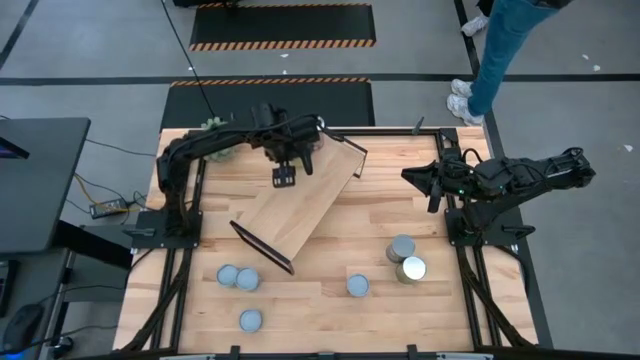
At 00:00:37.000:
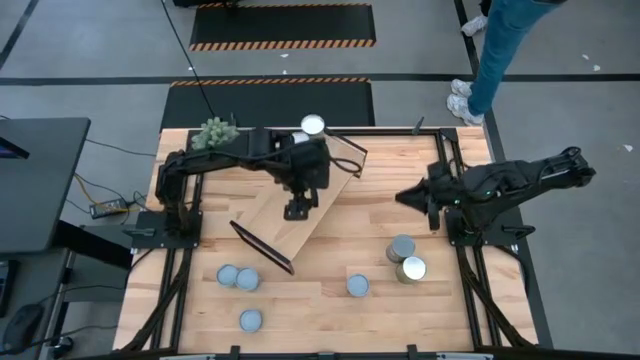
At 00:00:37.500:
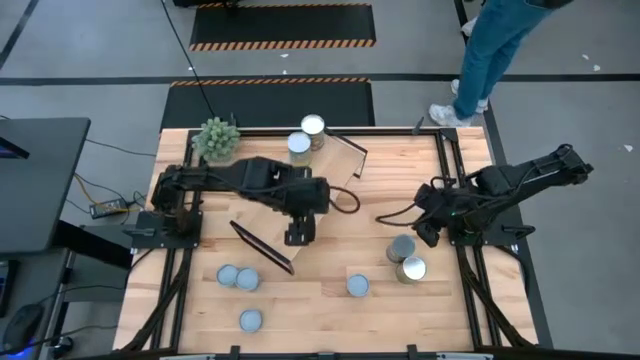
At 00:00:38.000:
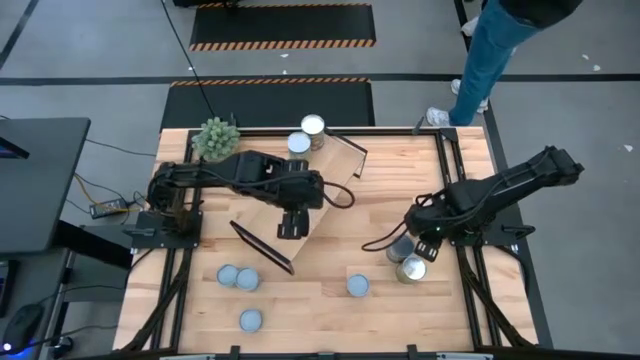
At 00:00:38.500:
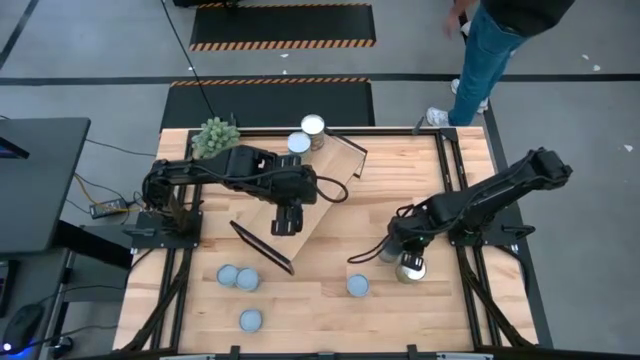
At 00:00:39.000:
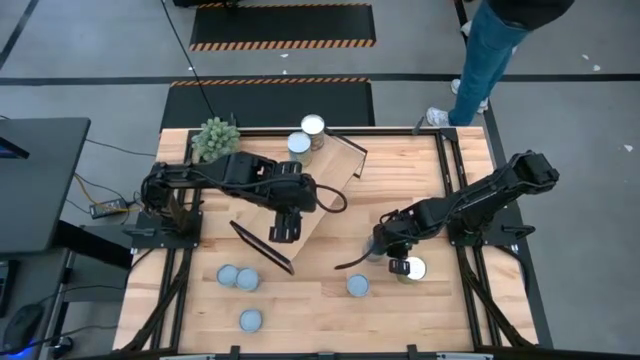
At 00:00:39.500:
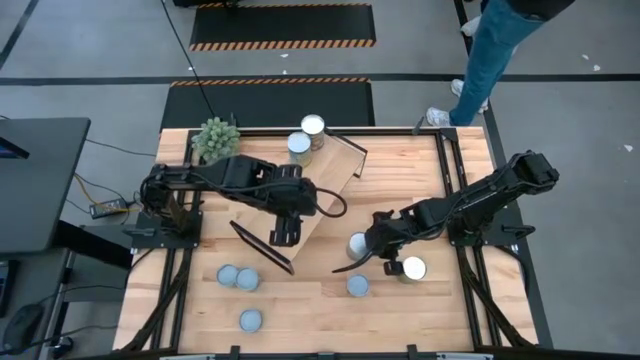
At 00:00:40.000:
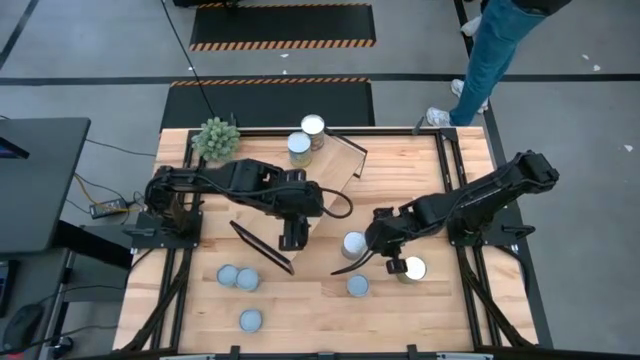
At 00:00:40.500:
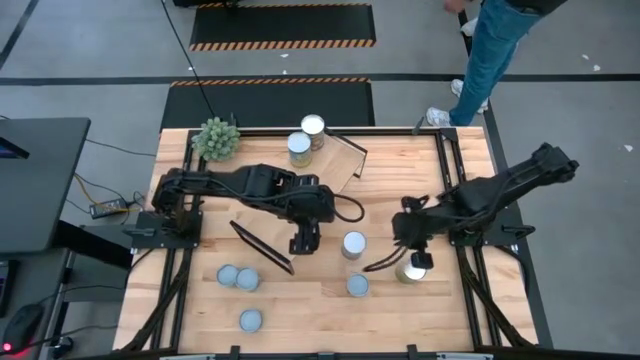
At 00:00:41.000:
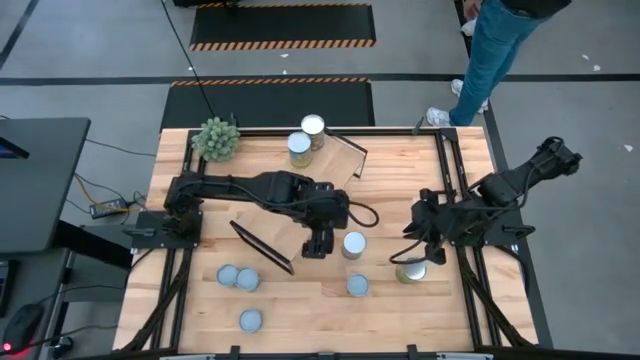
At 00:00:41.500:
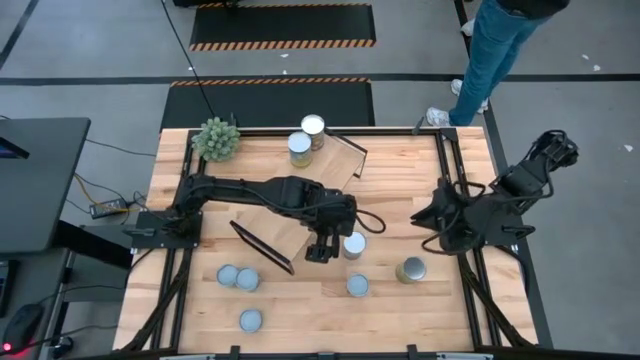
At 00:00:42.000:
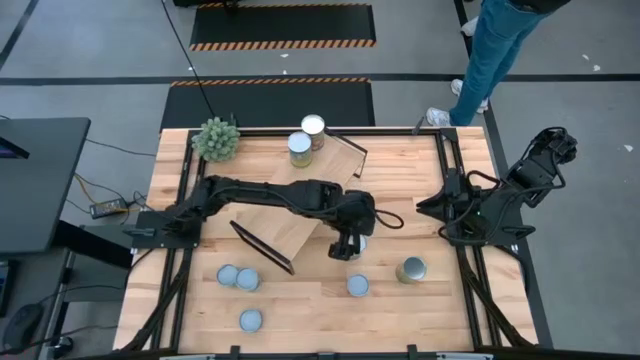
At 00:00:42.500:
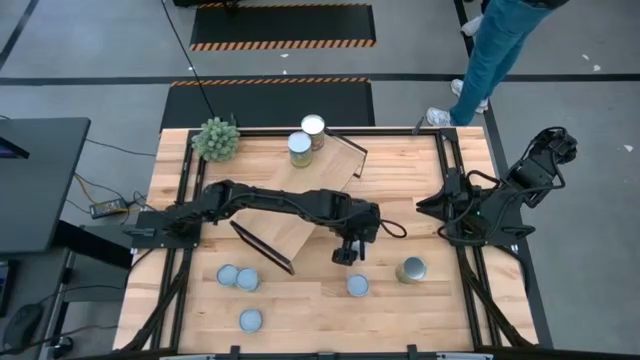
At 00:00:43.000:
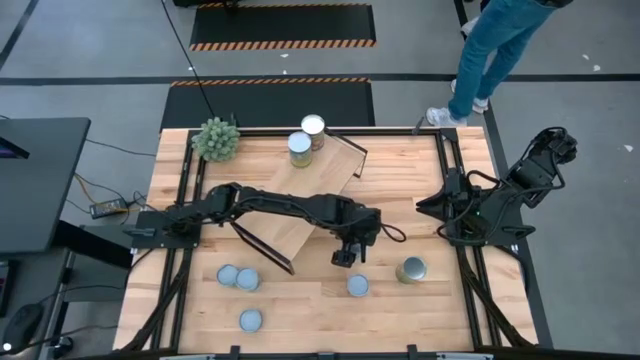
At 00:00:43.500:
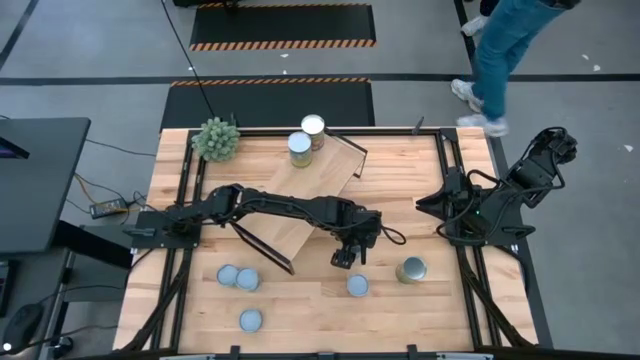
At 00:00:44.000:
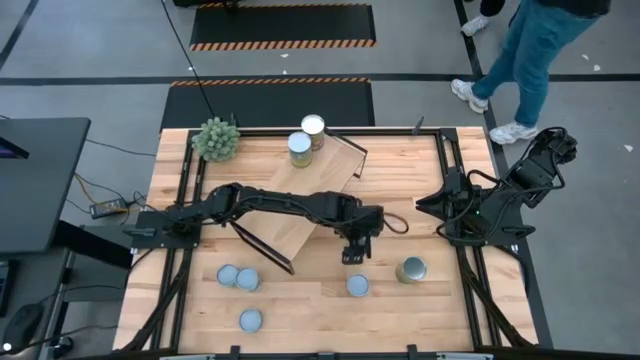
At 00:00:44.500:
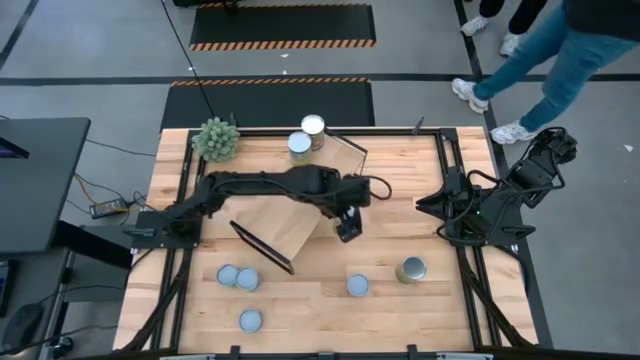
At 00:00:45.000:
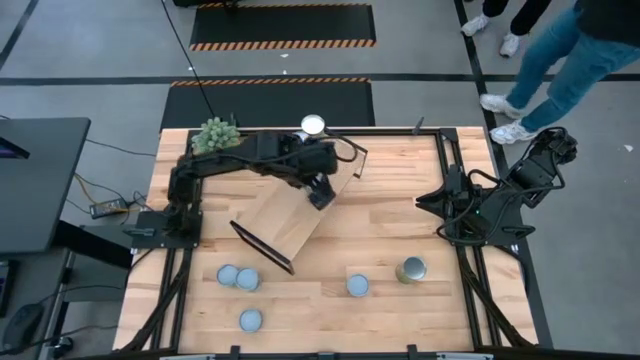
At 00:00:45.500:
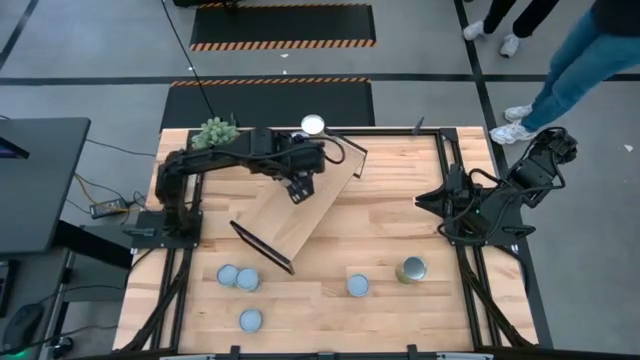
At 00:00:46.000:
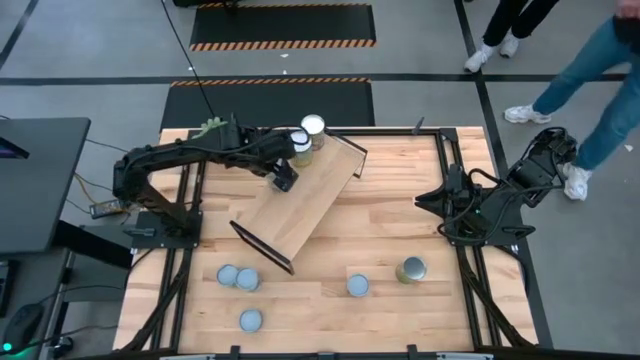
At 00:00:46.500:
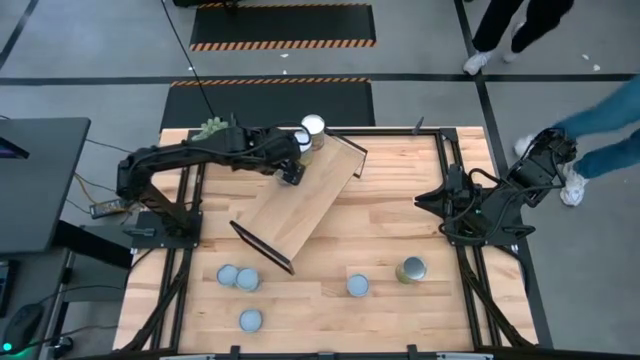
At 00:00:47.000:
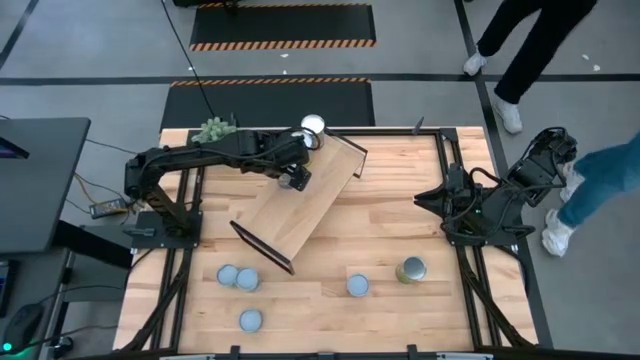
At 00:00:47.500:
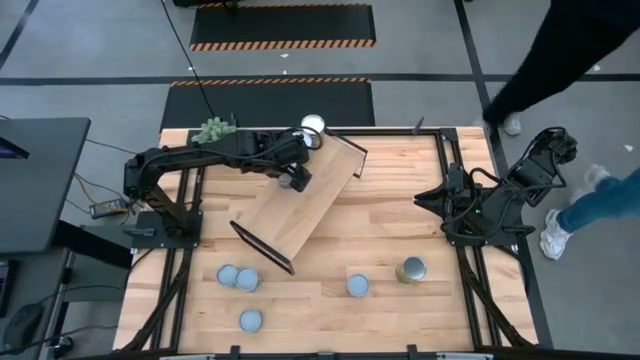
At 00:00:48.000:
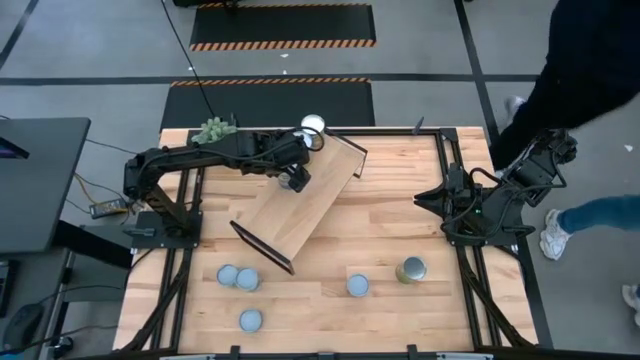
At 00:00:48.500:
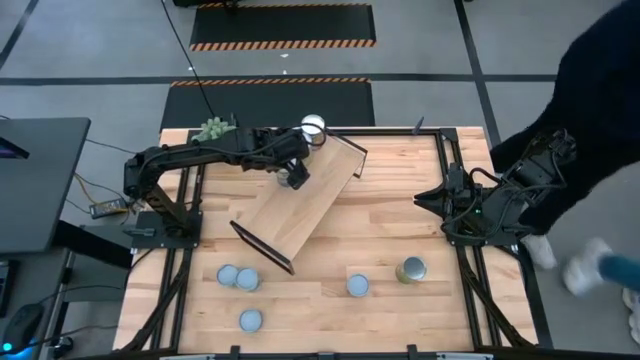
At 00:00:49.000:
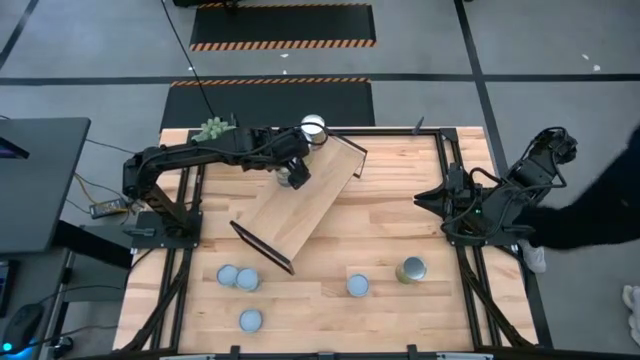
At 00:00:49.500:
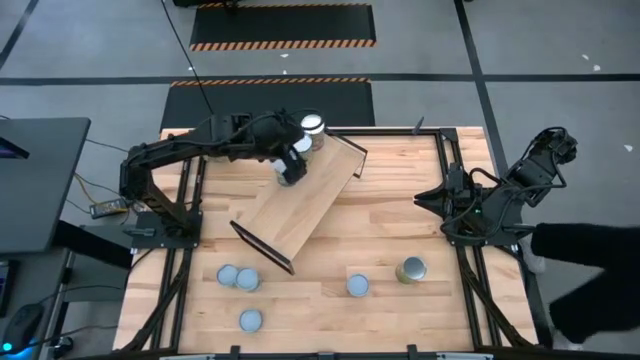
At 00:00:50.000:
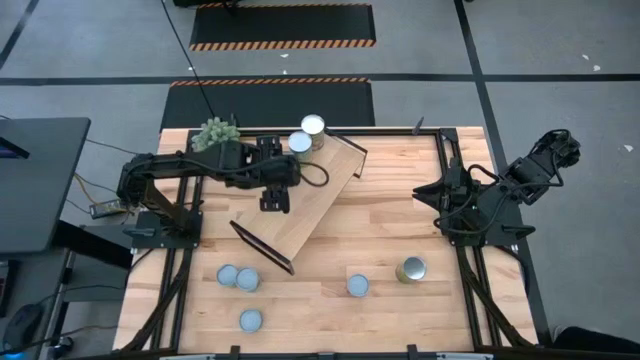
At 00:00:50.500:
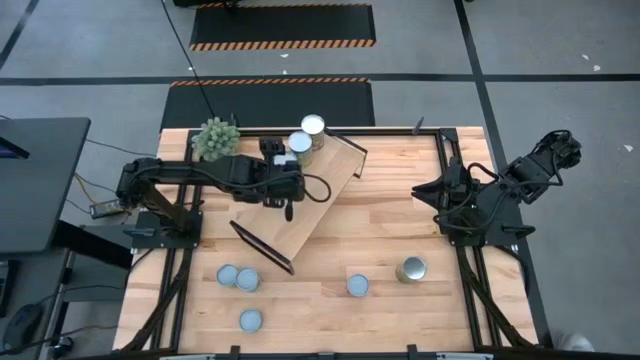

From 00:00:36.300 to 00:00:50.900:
Task: Pick and place cans onto a shelf
Put the canned peas on the shelf

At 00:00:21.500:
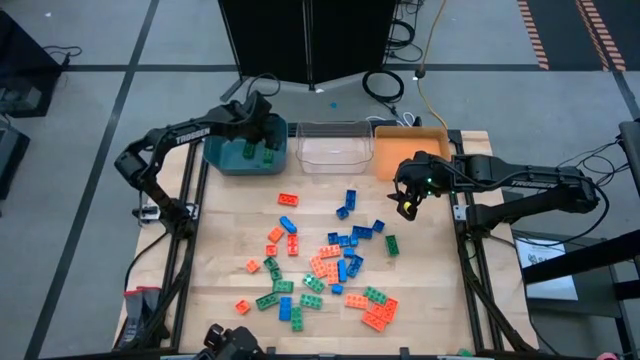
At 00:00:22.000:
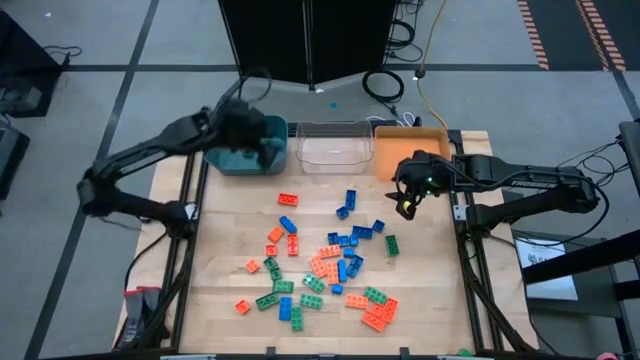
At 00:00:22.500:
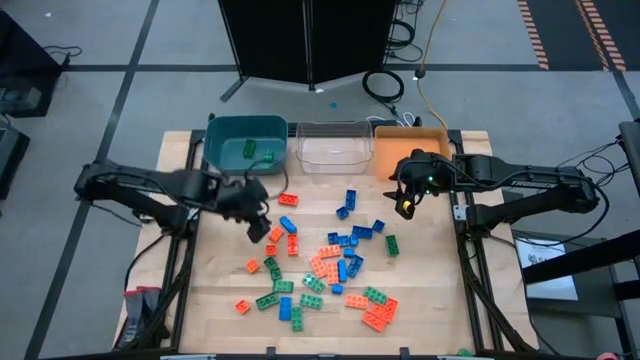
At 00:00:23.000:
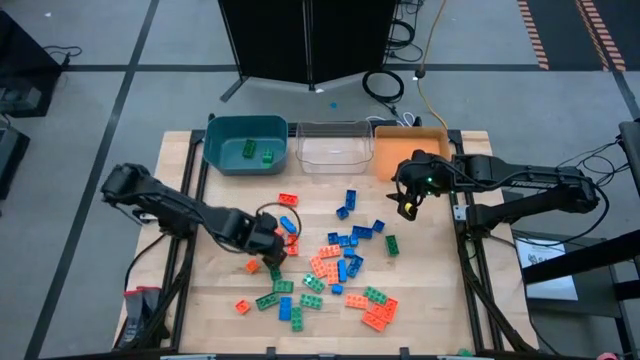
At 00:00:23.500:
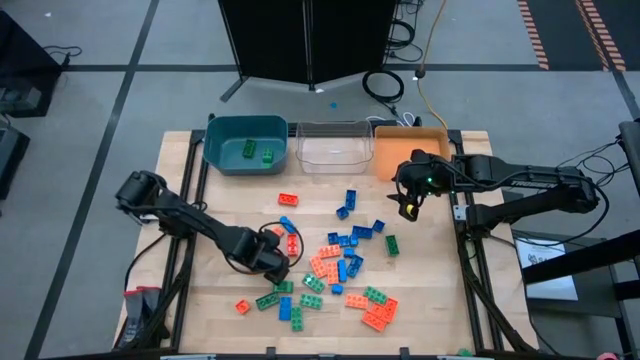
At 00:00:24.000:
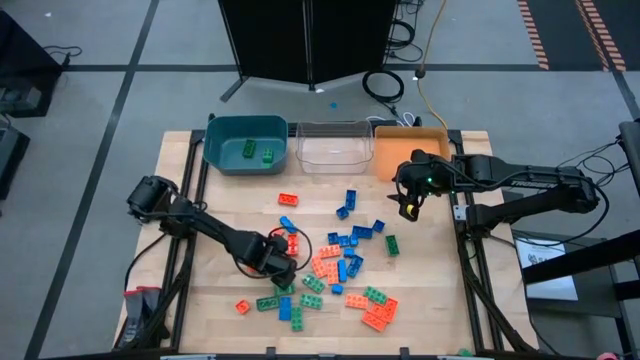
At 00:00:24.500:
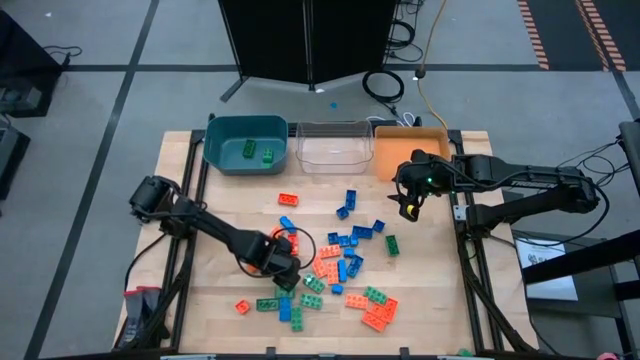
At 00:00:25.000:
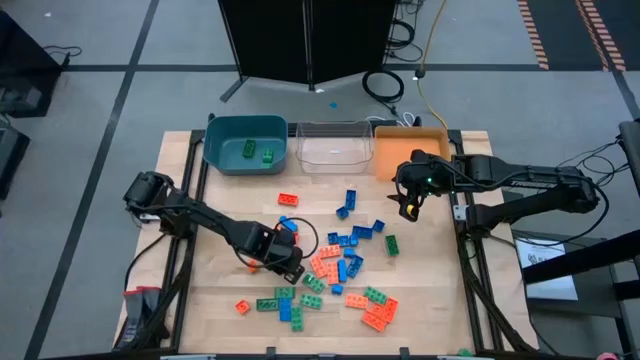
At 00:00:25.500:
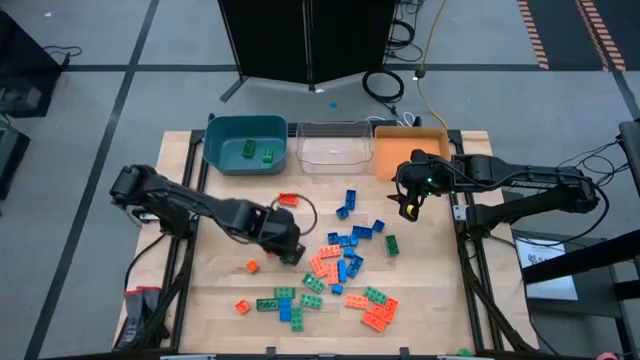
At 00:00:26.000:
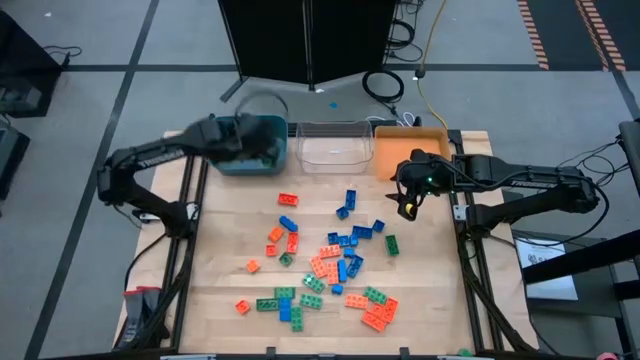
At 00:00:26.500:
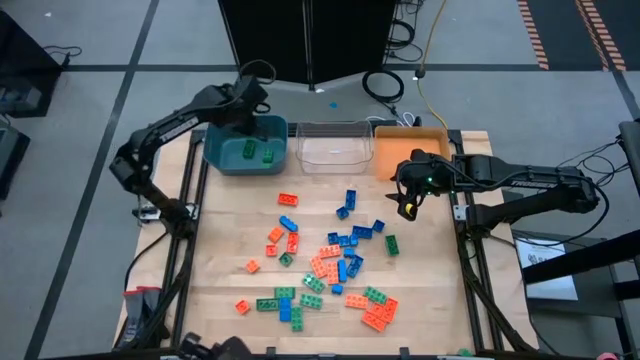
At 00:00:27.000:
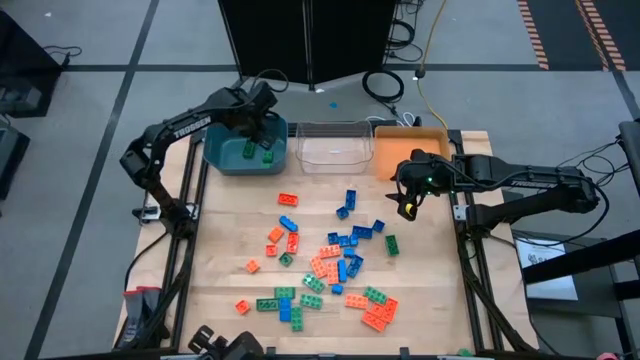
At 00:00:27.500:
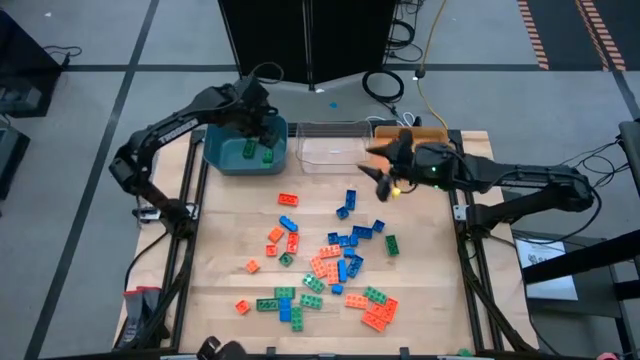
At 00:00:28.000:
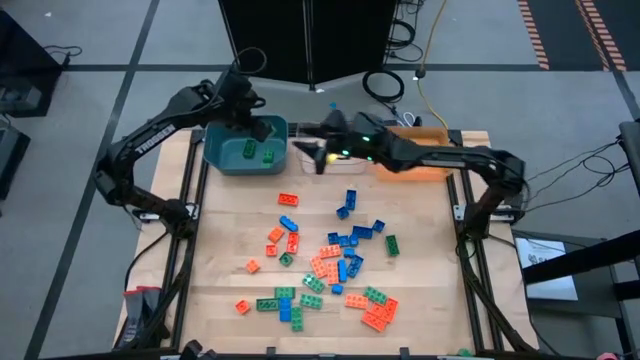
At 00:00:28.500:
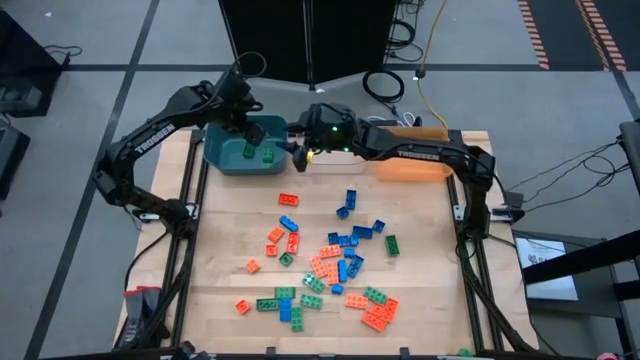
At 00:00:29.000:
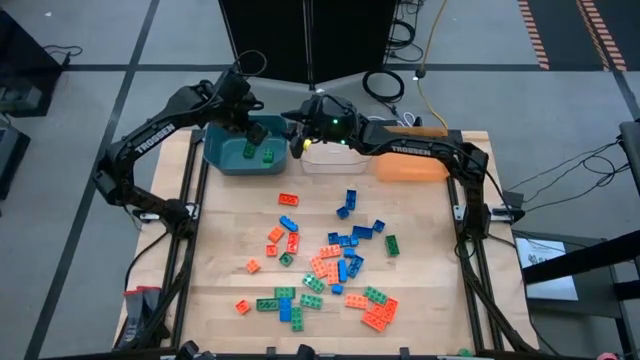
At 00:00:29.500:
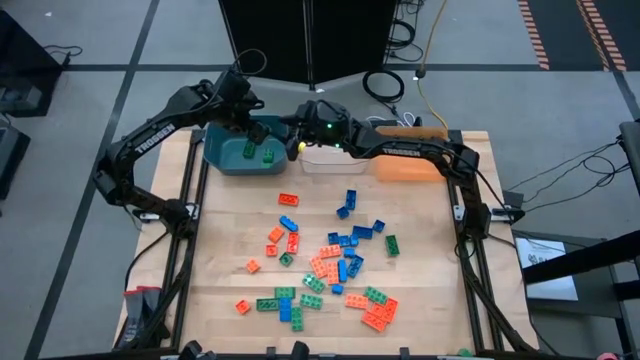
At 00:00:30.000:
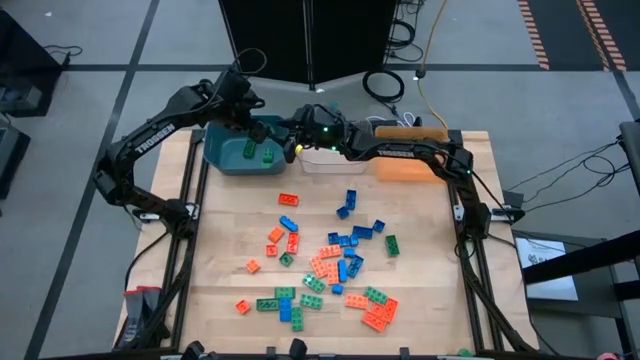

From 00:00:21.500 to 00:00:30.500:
Task: Sort blocks
Put the green game piece into the blue bin
